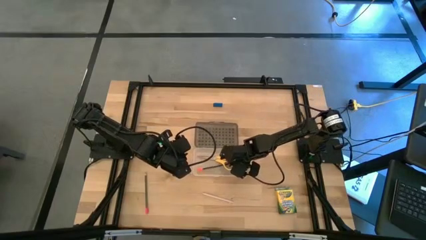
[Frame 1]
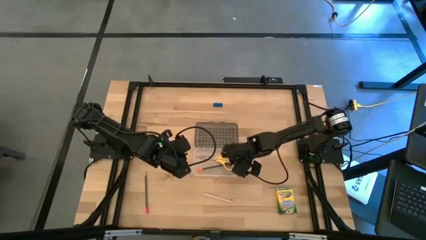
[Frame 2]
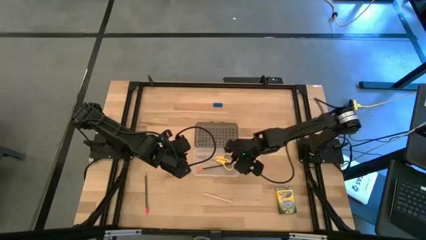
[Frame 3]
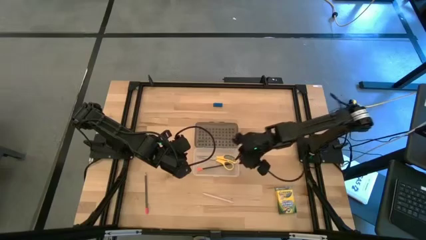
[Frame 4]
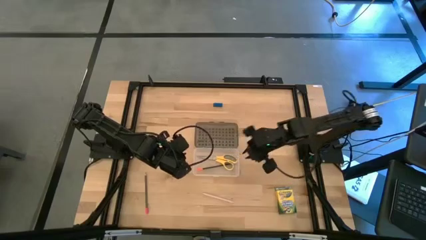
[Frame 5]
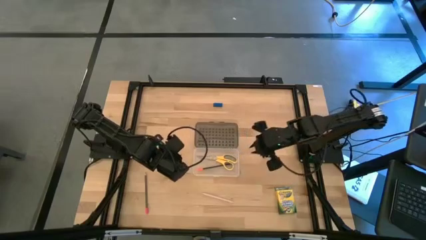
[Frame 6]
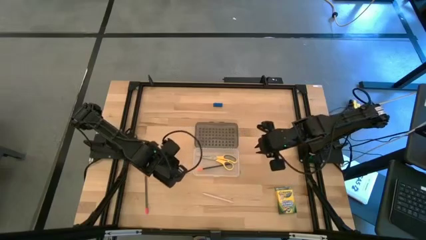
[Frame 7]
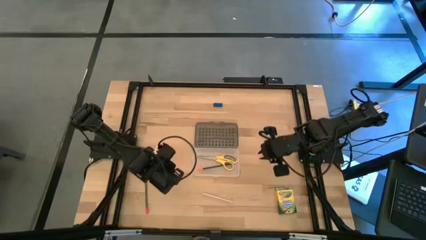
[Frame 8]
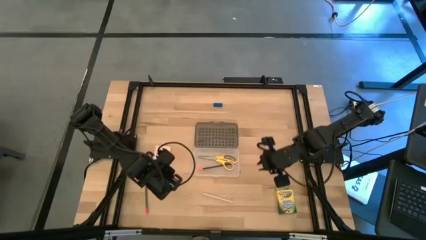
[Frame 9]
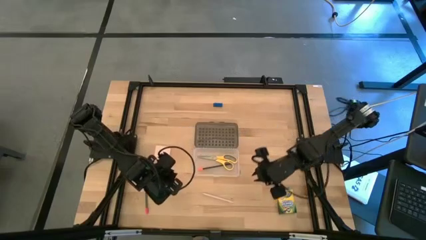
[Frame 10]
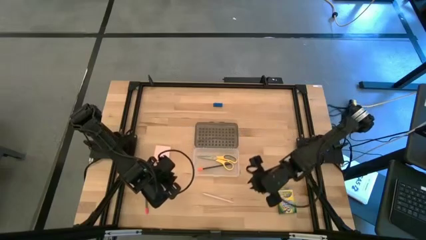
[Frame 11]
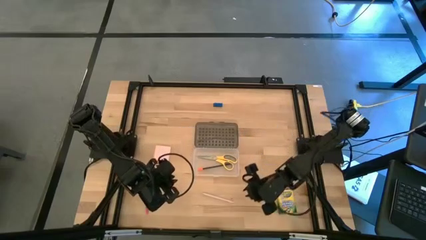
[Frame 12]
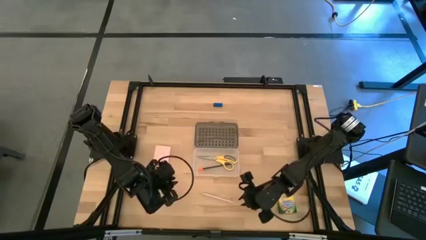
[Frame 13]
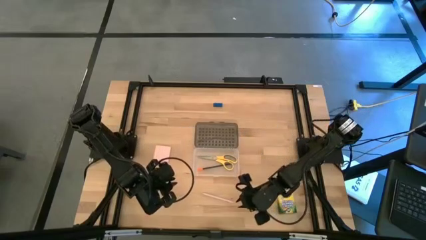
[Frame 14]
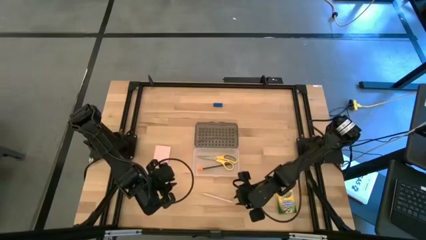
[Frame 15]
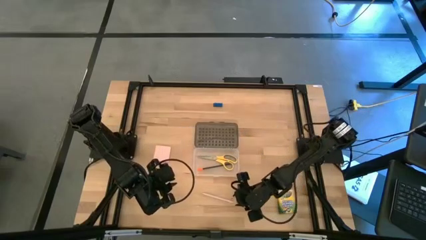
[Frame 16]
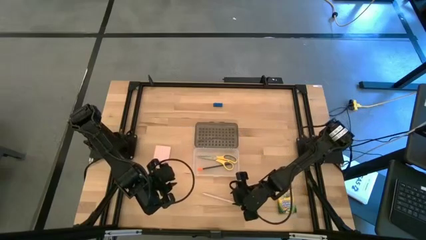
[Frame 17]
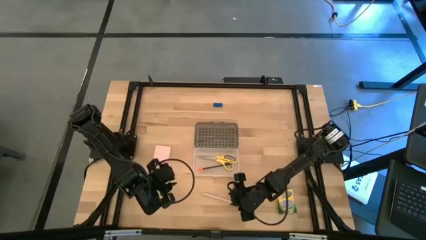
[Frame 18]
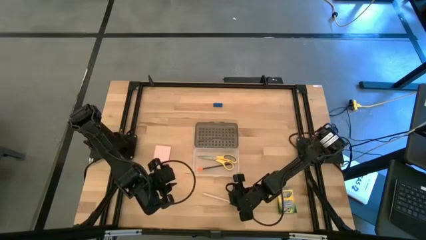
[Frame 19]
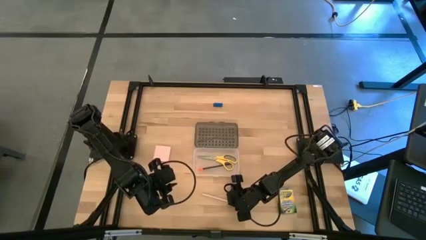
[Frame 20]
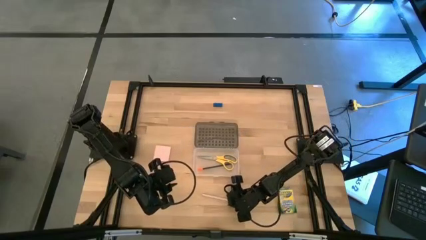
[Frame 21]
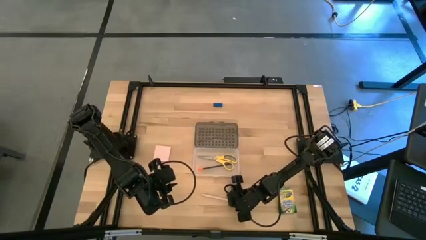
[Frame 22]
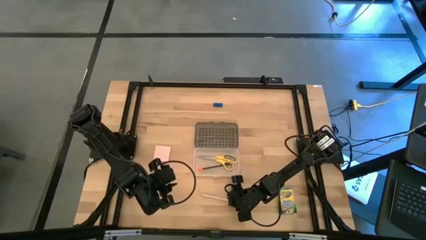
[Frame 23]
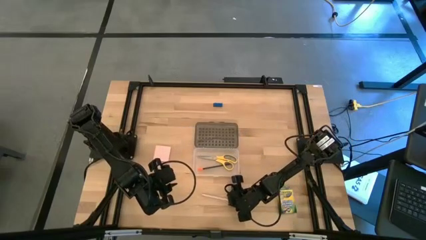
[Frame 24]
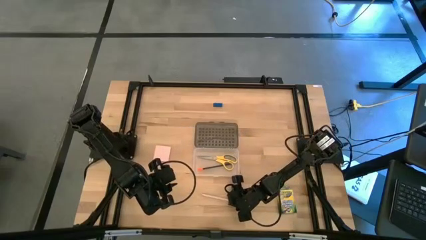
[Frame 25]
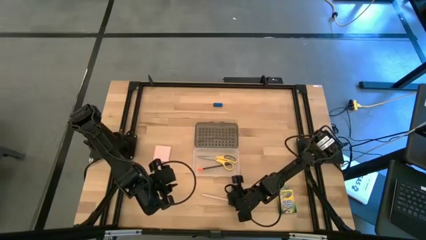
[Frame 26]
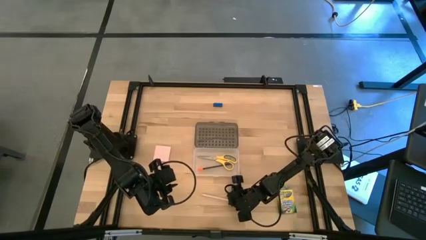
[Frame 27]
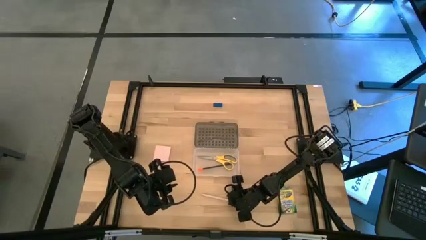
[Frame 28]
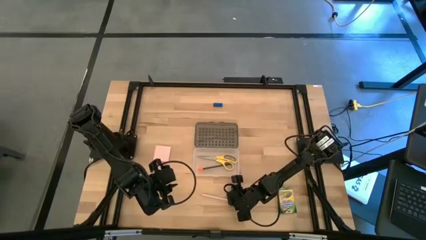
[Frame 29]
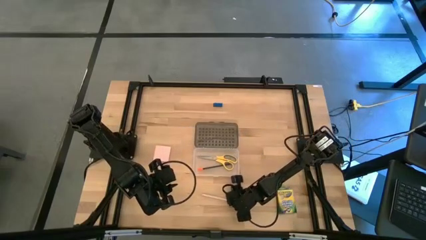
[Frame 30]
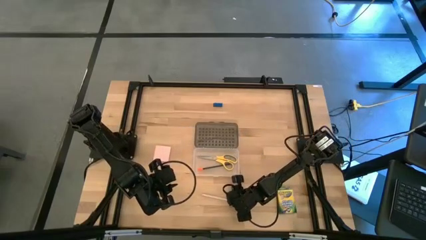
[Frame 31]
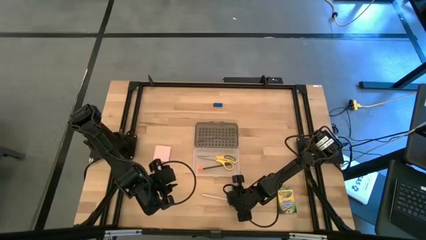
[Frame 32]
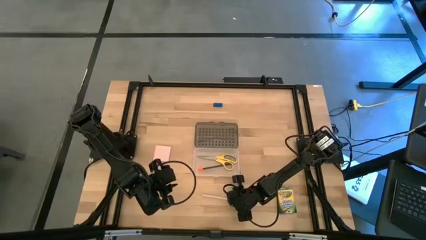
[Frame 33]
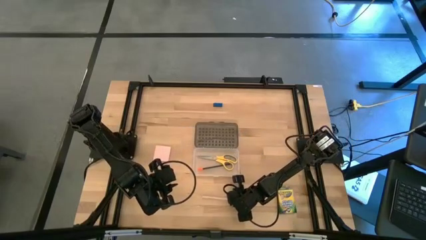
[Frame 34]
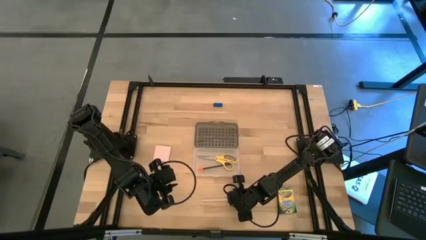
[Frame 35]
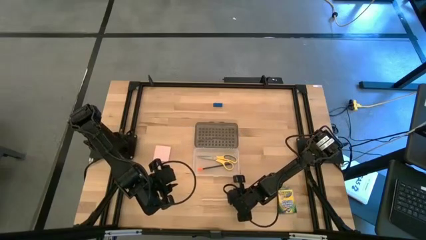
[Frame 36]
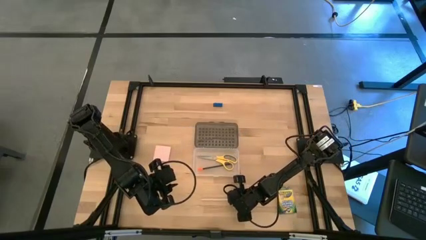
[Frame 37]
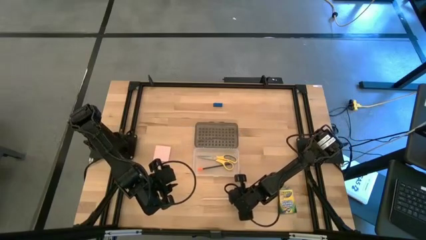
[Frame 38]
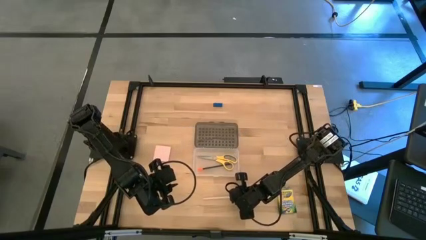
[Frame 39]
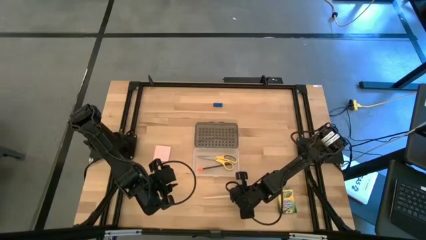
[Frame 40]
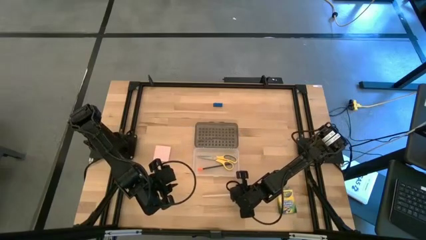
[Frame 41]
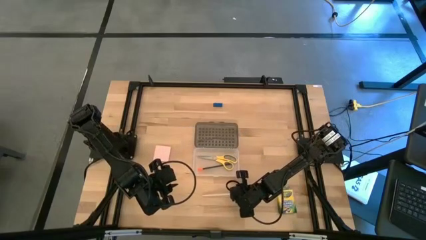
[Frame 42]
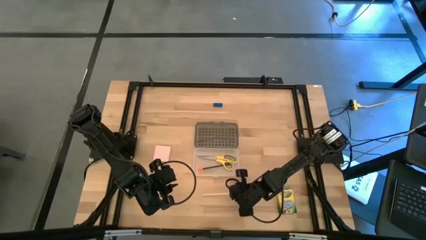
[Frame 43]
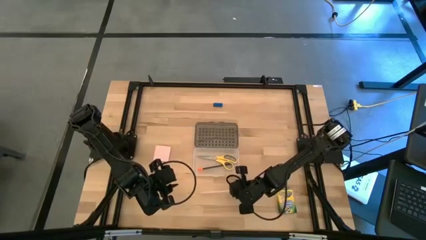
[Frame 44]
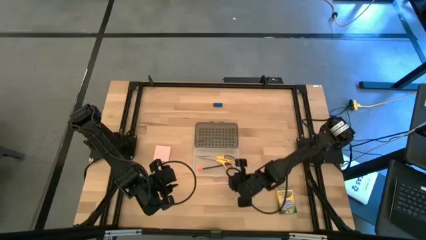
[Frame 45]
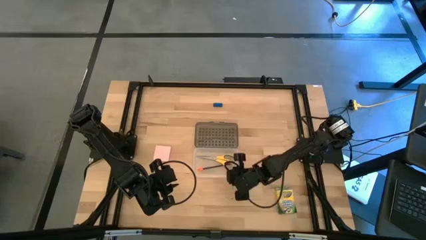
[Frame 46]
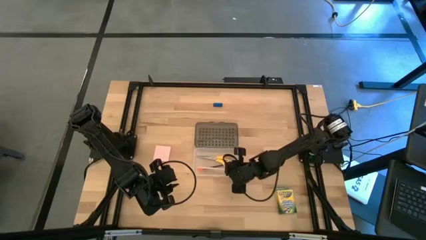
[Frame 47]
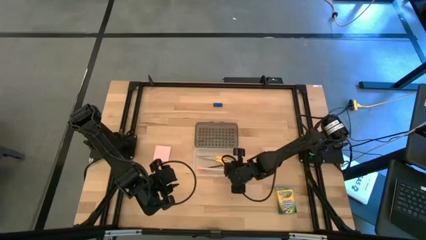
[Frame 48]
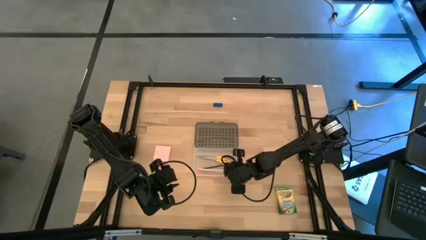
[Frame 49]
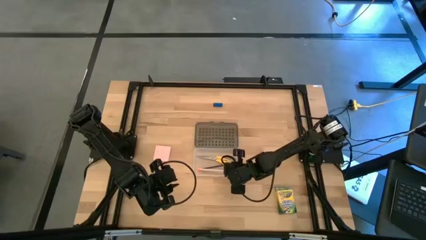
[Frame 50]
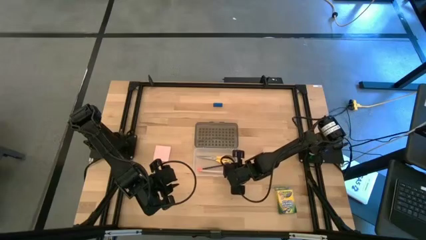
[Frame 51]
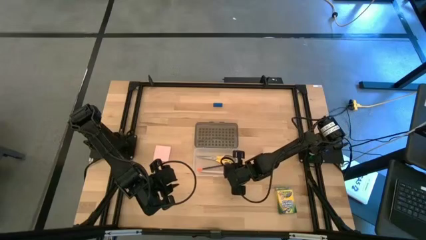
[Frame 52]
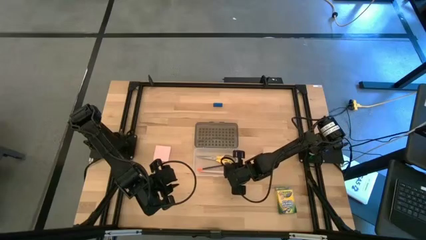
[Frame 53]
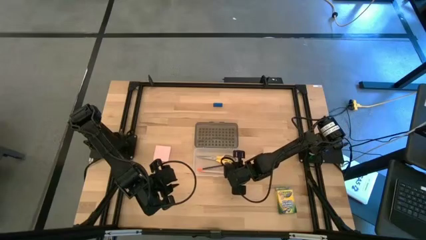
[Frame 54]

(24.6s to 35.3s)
Task: Pack school essentials
Put the pink pen into the black supply box

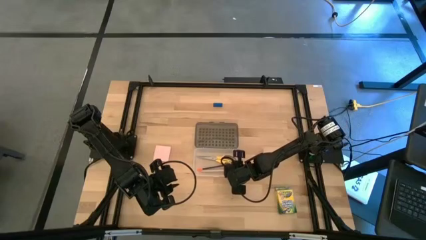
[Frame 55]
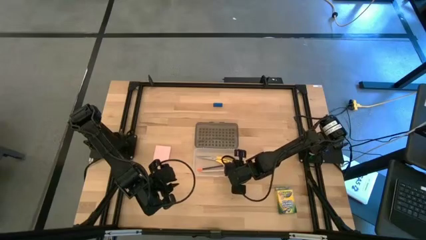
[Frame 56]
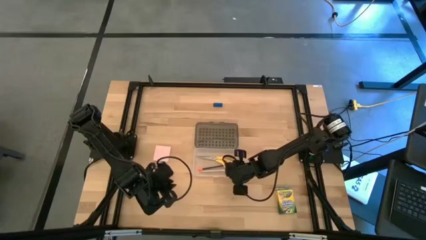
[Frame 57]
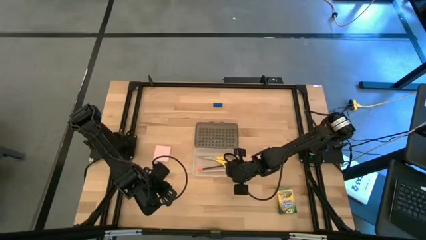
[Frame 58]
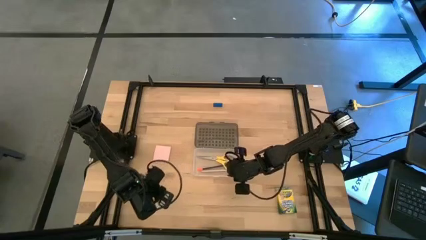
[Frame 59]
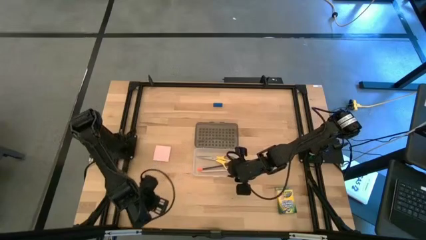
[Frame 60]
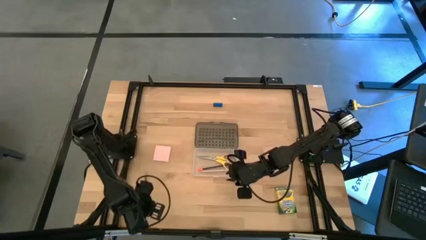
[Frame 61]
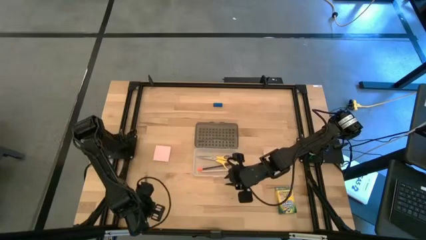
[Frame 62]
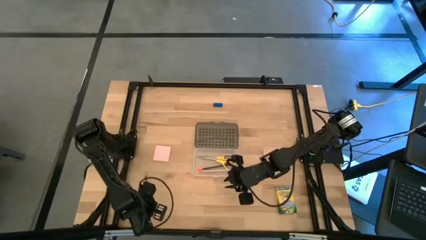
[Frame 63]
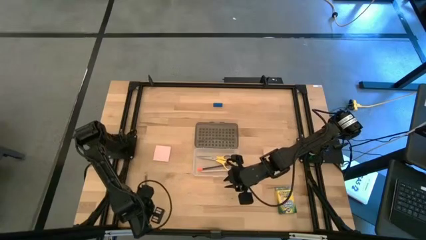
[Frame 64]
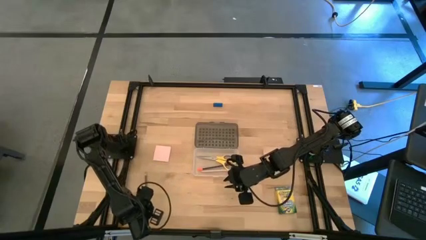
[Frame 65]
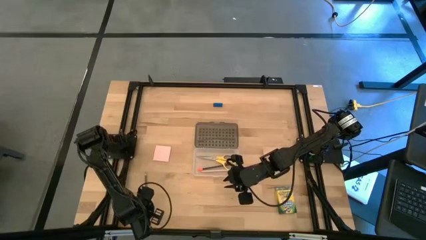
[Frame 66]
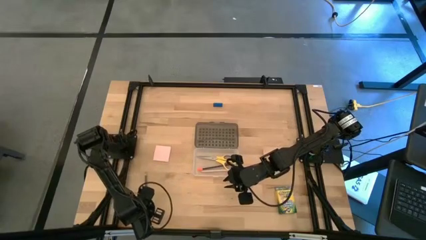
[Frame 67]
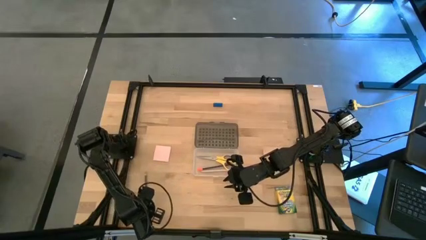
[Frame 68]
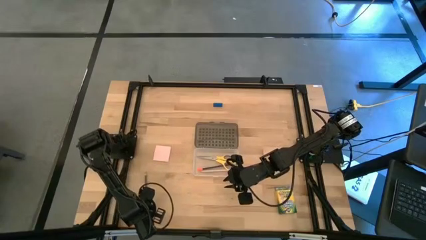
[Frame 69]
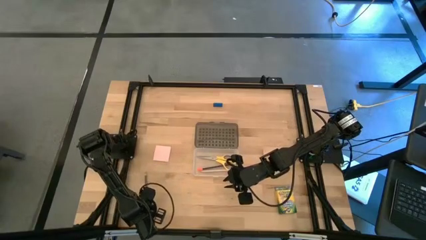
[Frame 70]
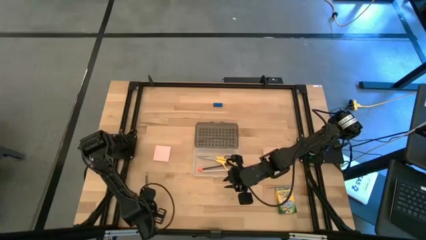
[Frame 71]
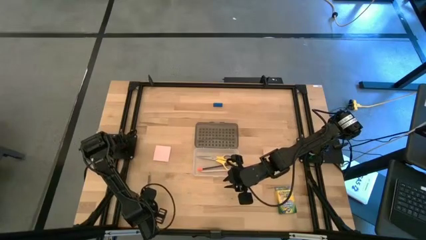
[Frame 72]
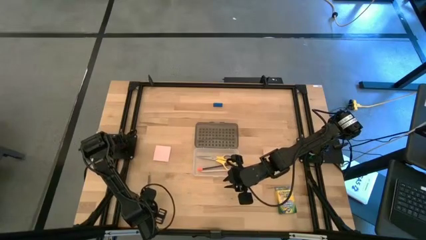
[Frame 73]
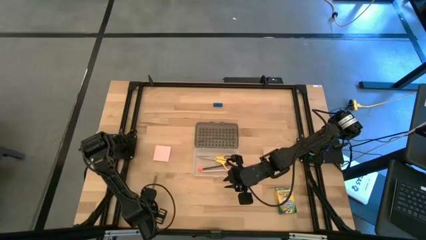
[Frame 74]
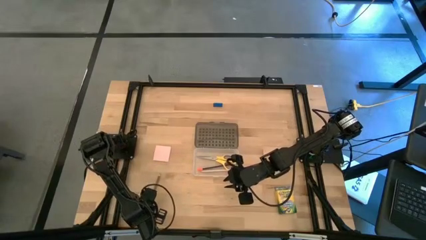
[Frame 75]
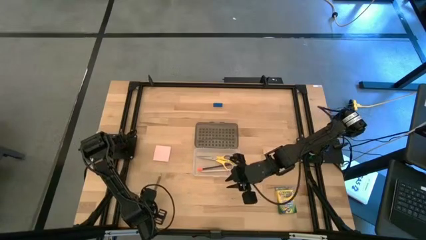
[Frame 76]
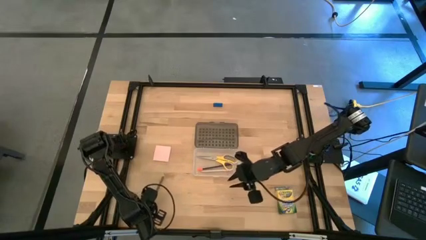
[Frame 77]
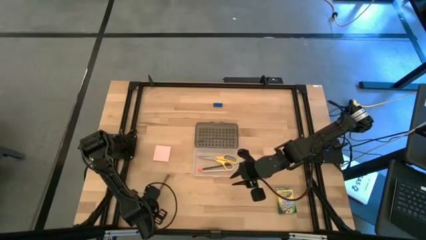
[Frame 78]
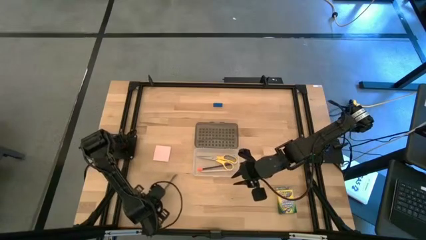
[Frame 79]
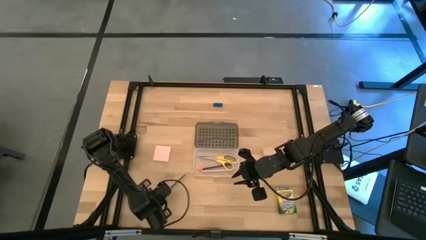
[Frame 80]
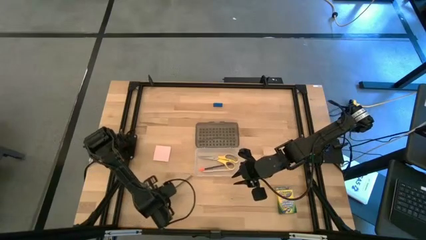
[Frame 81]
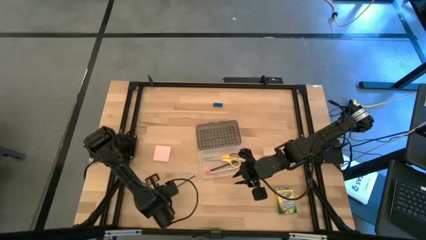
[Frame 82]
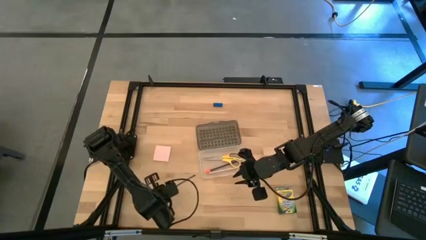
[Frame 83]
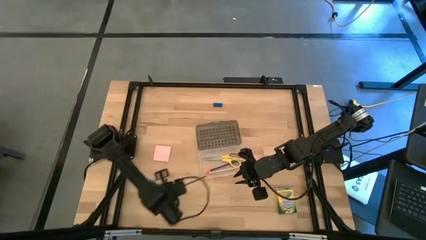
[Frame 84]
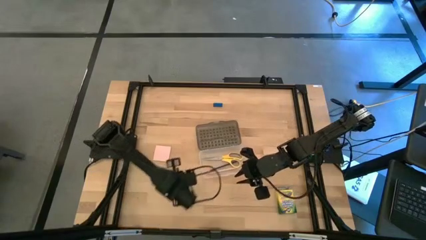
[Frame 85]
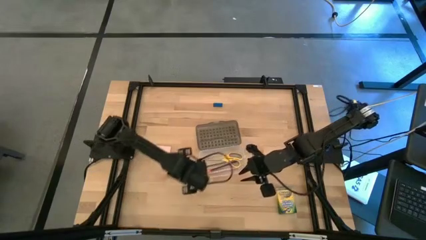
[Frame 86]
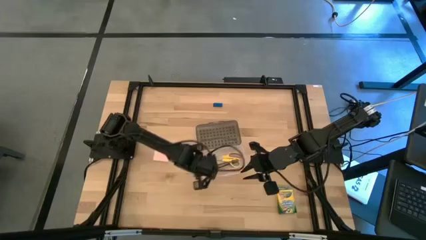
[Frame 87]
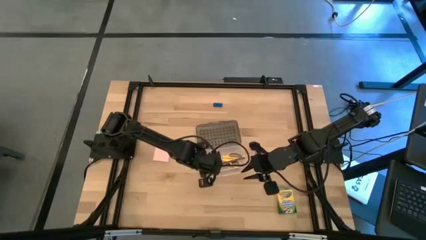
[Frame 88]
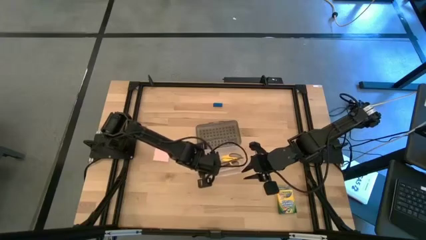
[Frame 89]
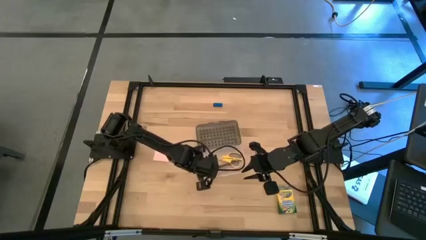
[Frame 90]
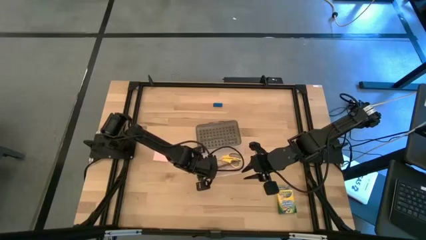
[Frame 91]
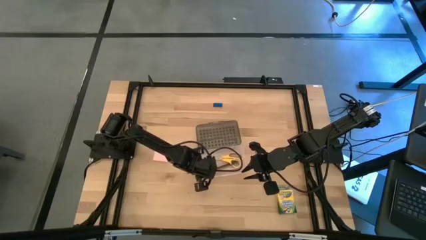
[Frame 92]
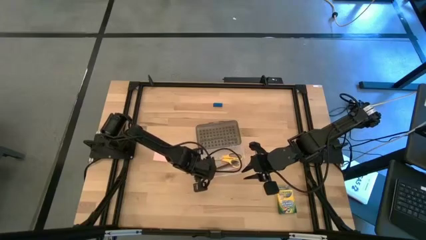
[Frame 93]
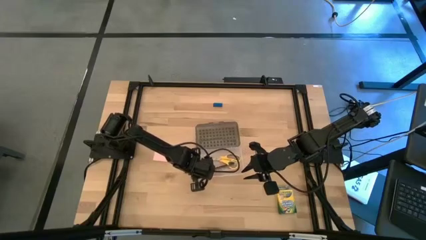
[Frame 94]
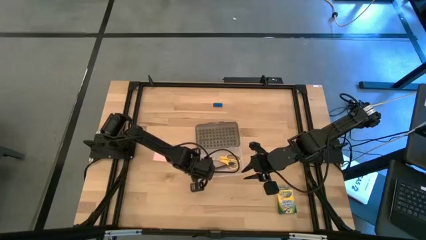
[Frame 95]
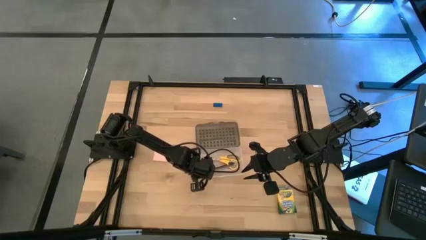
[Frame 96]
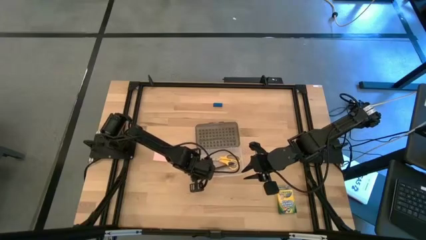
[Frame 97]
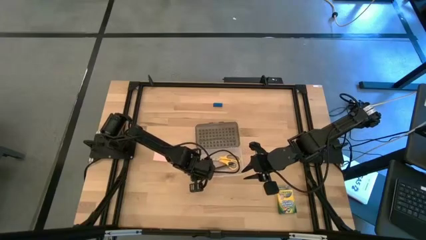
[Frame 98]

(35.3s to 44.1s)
Put the black pencil into the black supply box
